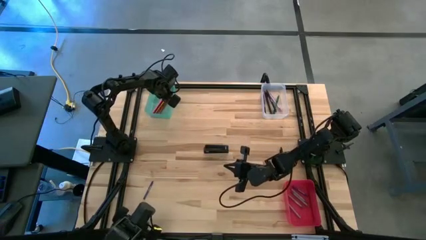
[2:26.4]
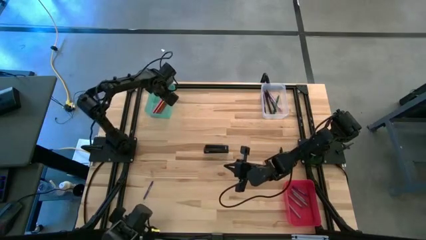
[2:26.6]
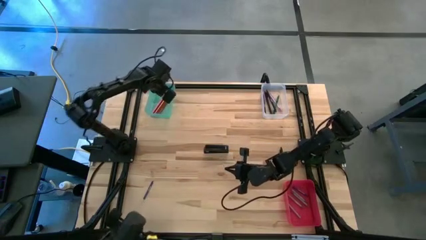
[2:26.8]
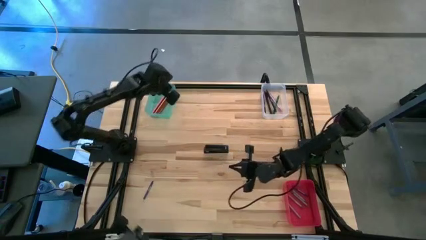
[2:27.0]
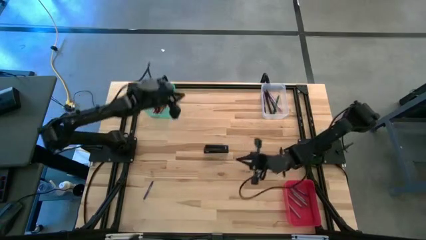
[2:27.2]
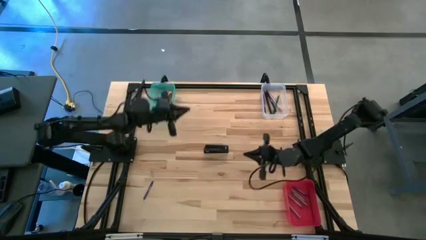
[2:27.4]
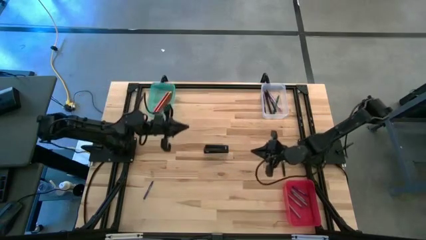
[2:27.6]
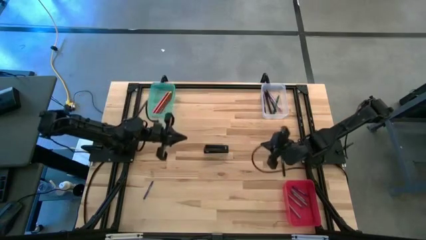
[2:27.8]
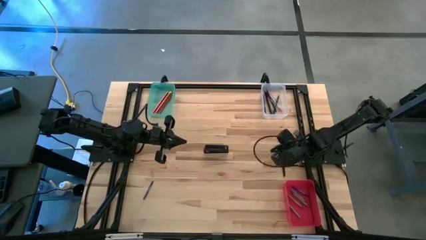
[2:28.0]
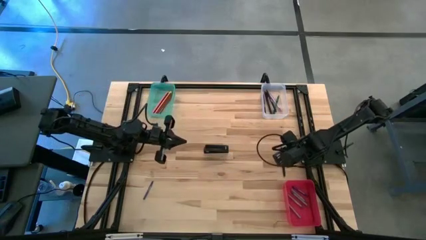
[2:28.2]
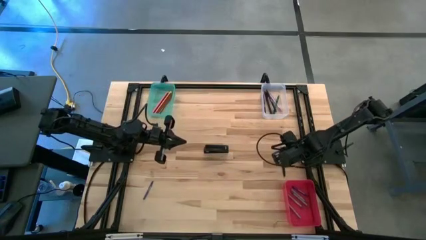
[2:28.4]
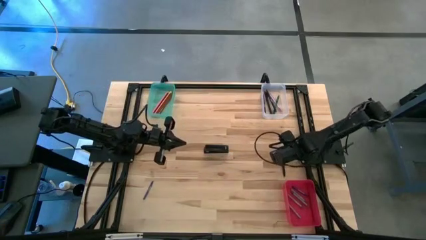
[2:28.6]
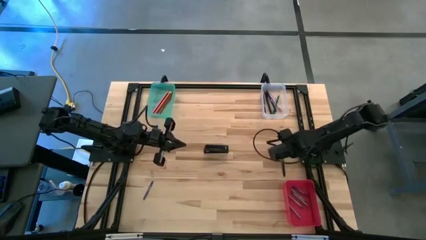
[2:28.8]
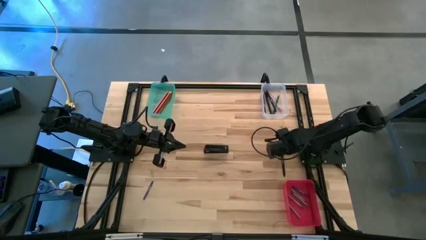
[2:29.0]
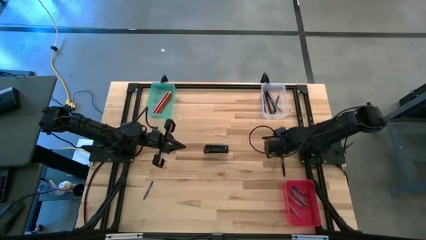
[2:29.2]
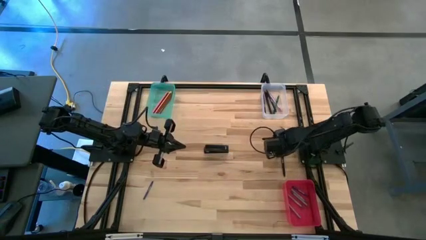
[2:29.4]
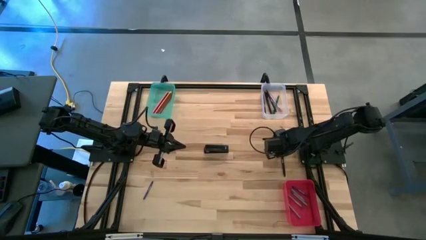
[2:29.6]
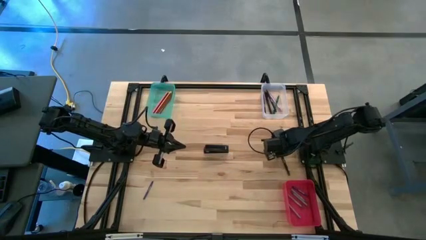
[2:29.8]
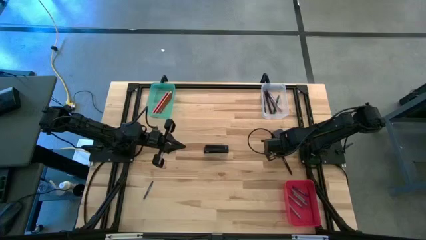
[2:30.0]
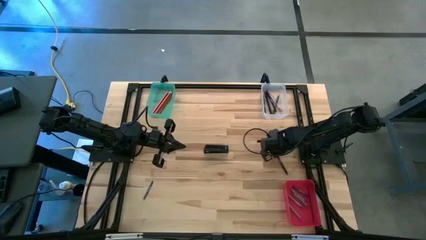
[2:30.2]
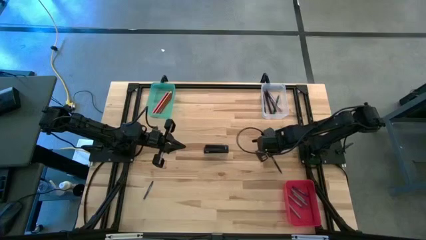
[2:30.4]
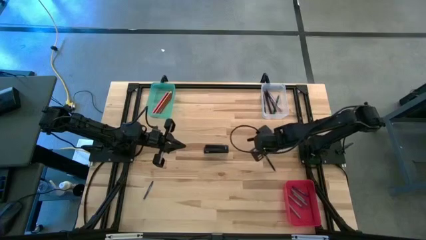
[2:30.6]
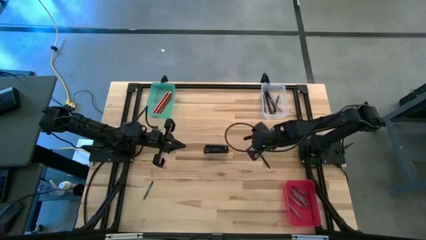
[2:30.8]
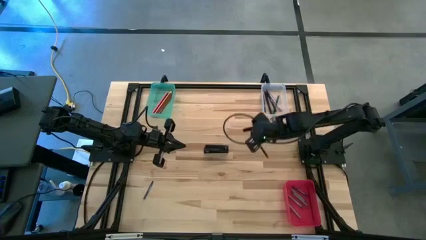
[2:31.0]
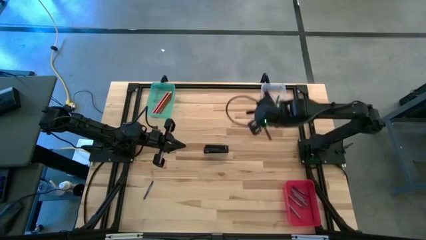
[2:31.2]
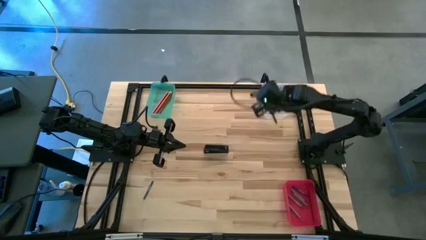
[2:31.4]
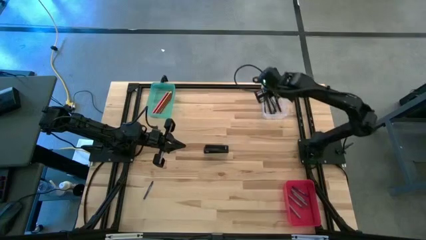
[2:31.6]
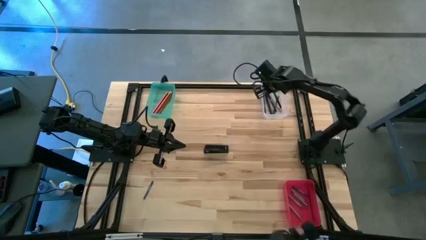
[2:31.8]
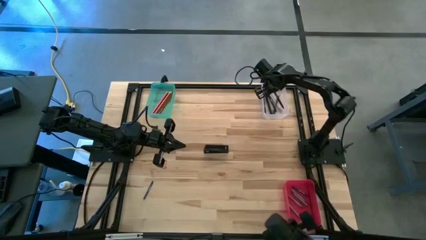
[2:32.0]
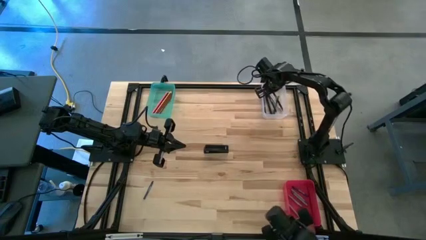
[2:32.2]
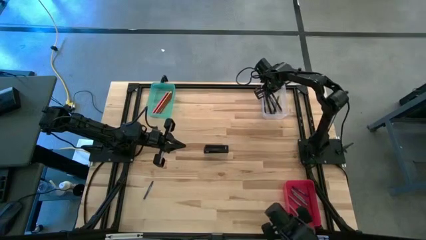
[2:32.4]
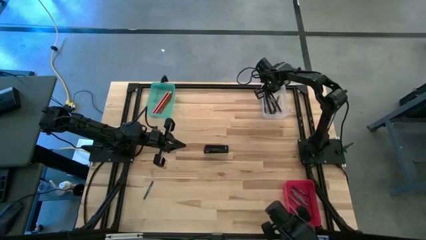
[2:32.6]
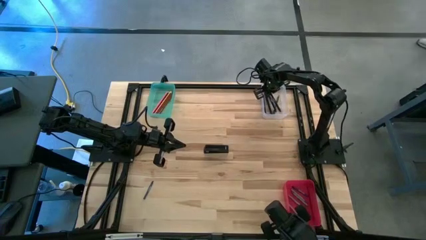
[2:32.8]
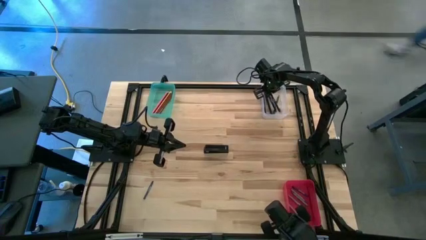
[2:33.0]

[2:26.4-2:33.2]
Task: Sort crayons/erasers/pens/pencils in bins
Put the black pen into the transparent bin

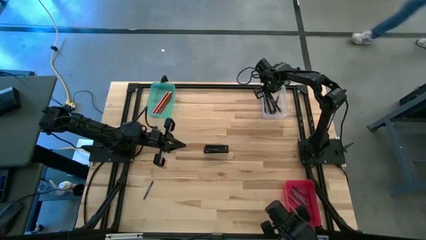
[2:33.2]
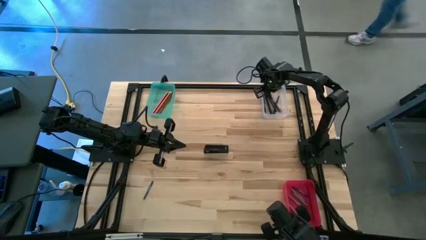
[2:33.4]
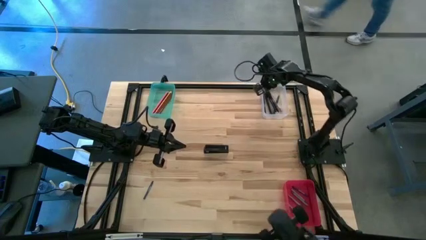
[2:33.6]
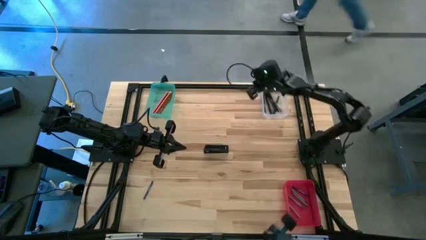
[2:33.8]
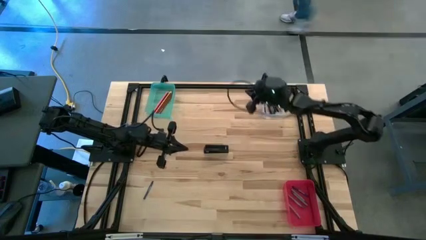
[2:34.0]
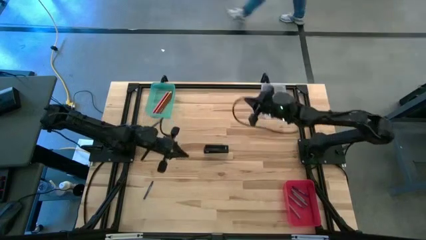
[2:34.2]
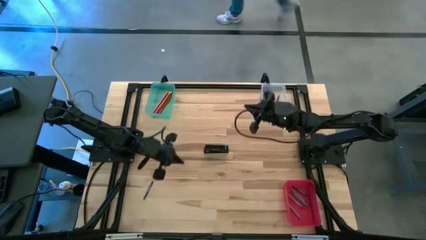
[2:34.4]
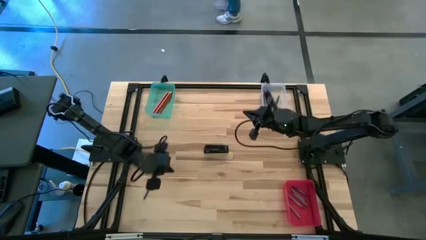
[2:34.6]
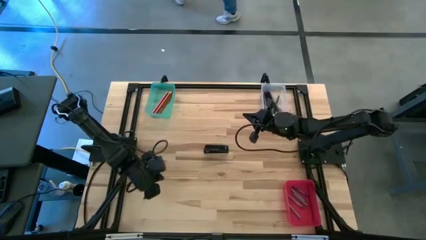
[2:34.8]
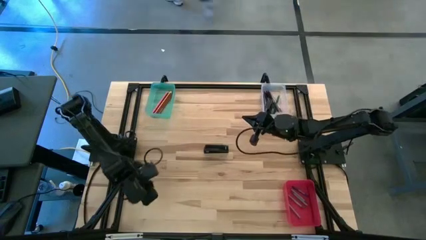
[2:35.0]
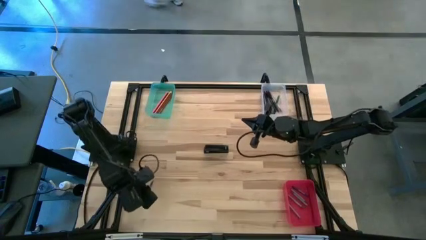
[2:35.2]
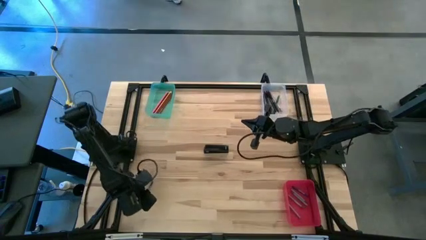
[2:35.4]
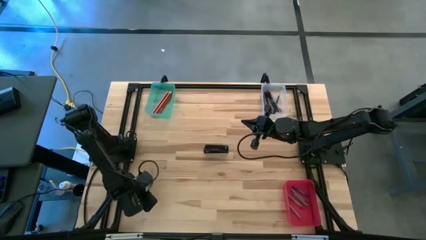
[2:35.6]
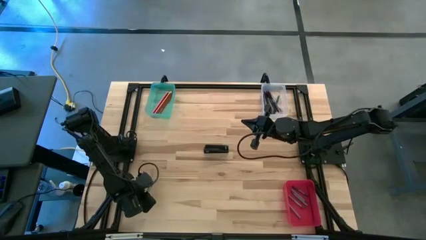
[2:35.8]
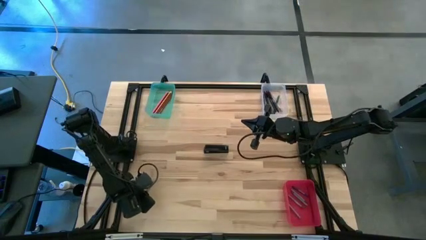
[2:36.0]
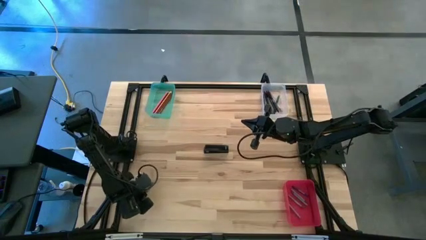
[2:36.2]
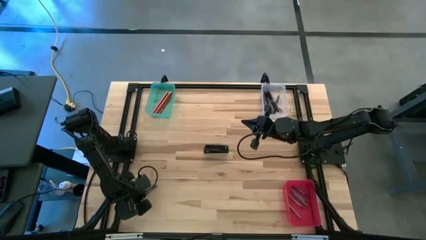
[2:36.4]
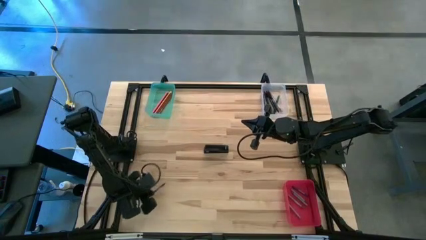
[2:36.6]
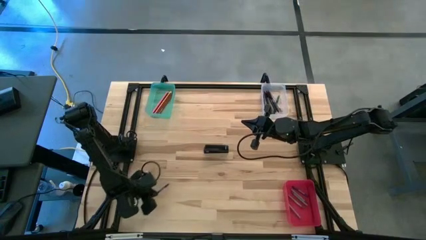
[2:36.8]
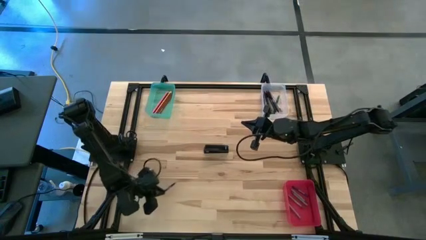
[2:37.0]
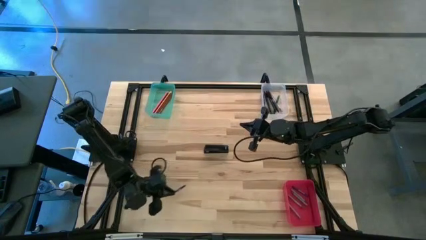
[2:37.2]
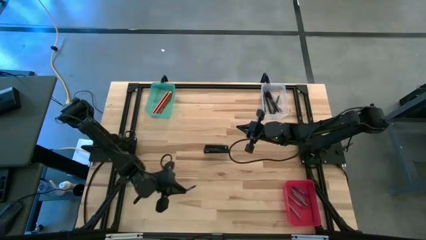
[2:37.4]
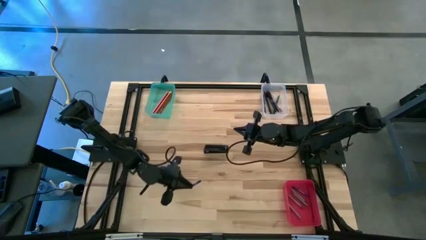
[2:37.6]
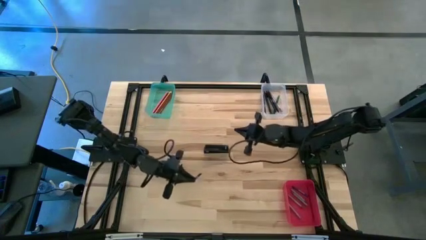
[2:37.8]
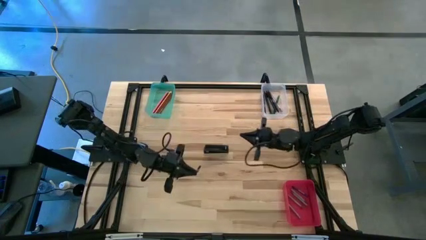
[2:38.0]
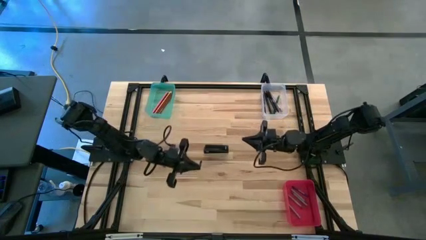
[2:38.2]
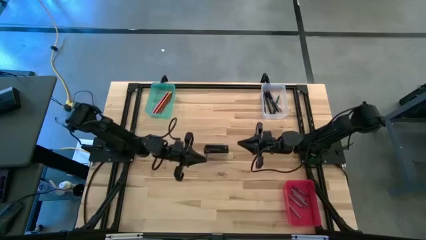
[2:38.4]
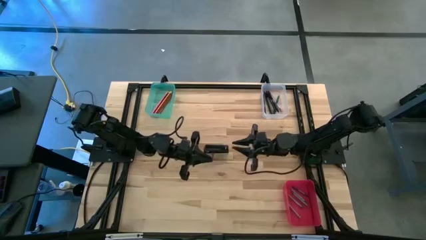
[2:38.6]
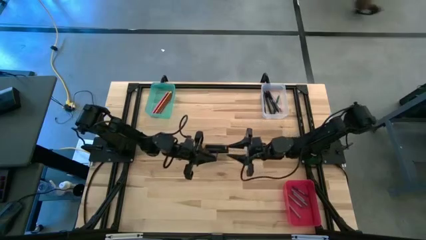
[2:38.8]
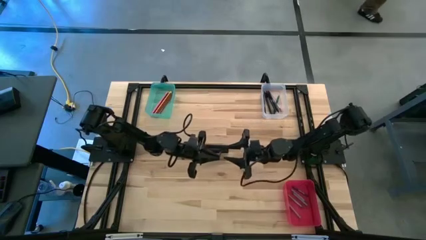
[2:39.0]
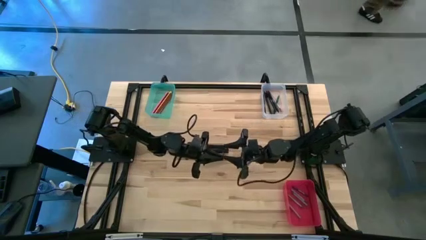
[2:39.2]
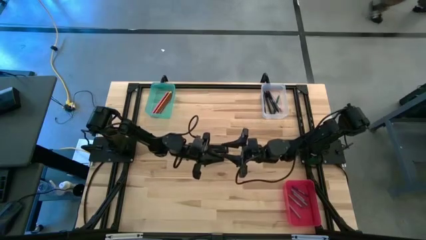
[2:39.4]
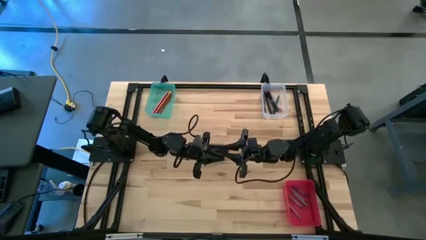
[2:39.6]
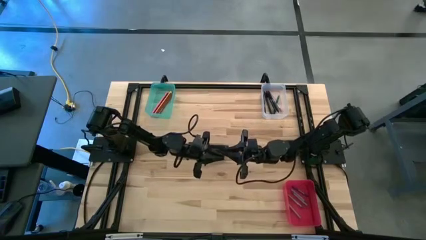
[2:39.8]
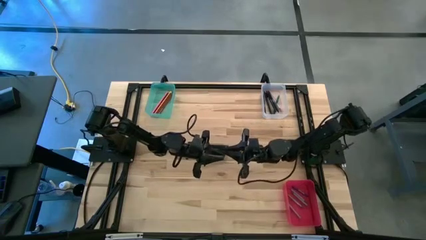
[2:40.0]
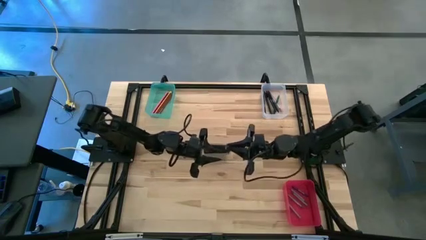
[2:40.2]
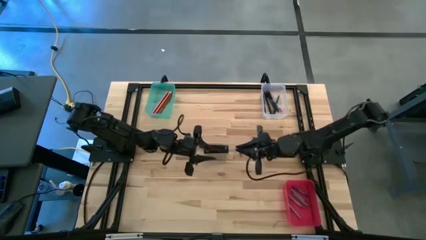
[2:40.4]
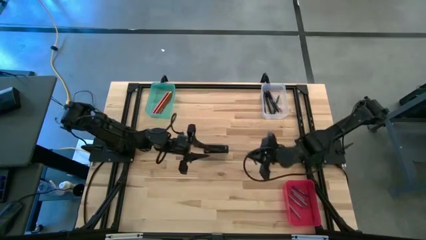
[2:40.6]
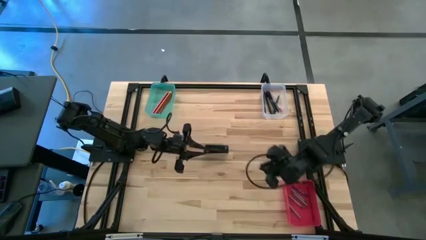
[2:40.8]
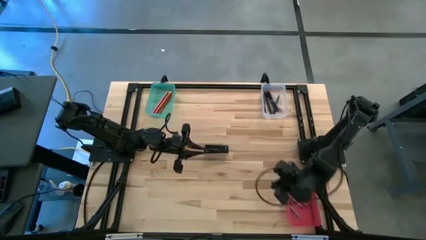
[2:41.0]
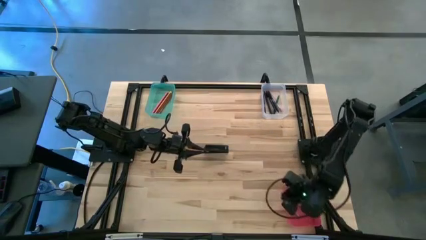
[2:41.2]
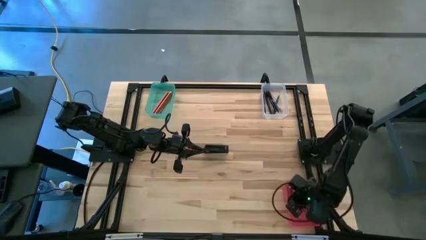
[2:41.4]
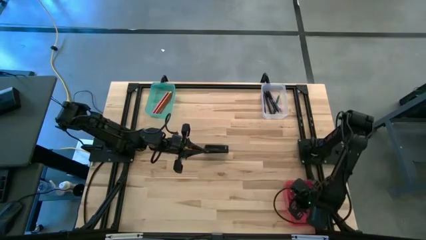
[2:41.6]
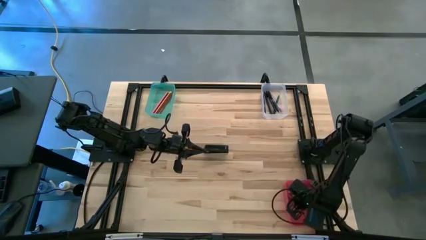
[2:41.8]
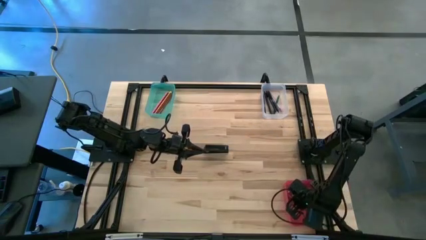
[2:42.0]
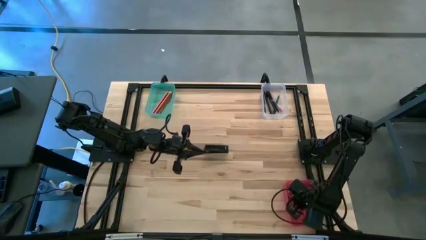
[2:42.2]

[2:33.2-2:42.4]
Put the blue crayon into the red bin

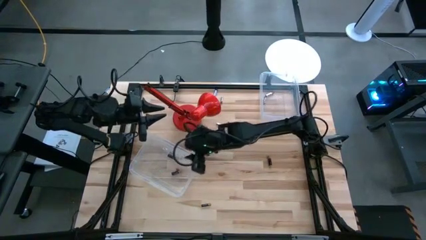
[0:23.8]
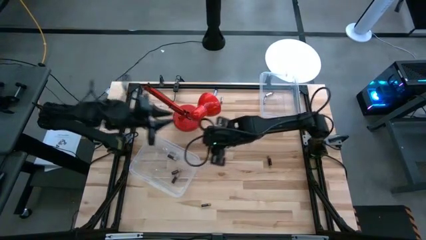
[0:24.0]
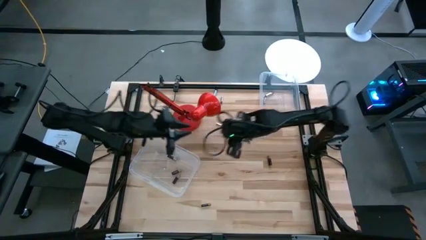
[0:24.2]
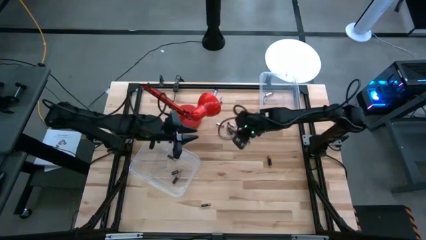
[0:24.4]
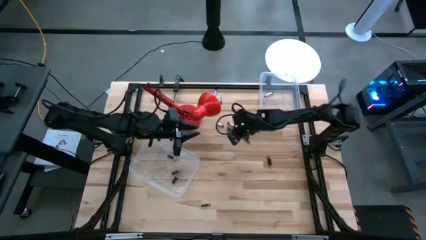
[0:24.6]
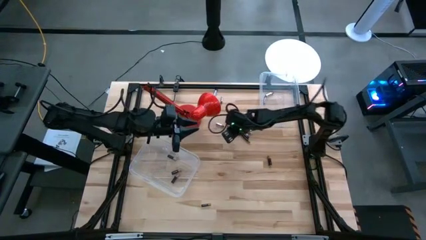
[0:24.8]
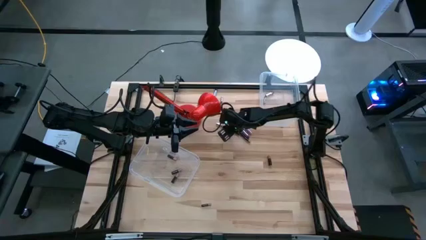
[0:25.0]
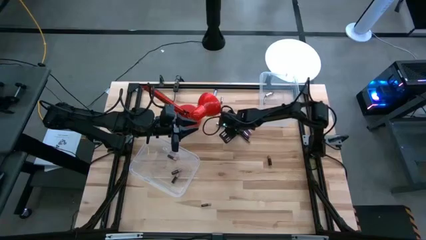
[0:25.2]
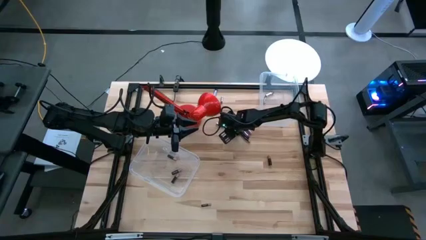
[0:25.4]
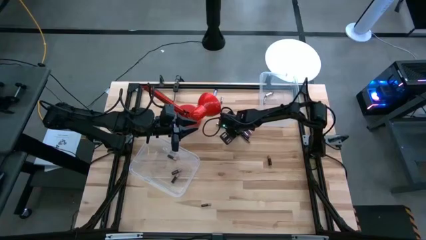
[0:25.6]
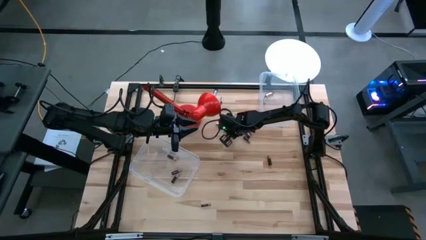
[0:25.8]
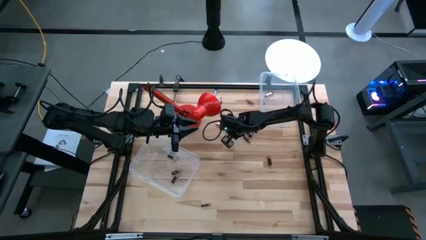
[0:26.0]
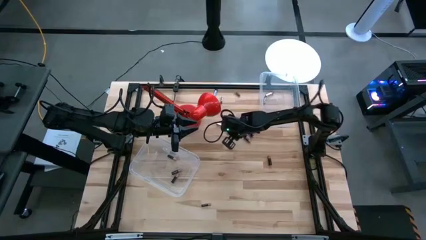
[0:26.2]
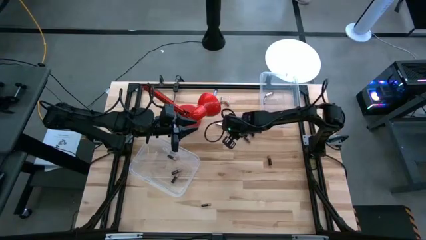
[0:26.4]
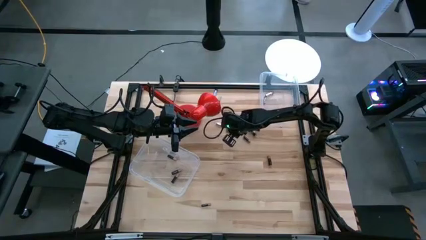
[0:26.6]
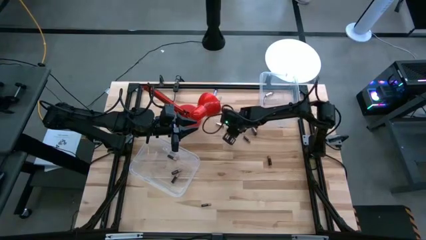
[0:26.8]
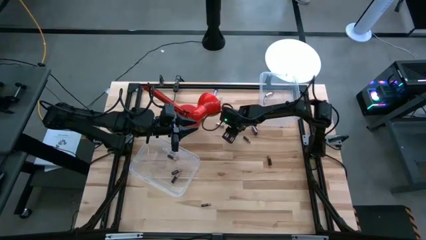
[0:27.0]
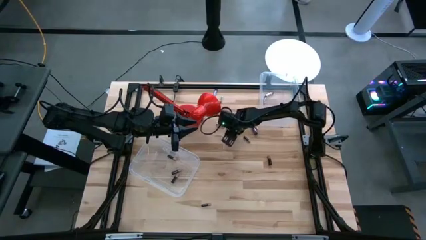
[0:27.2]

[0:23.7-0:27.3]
Task: Sort batteries
Put the black battery into the bottom transparent bin
